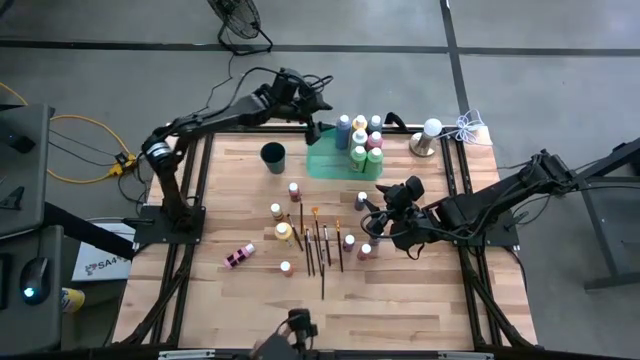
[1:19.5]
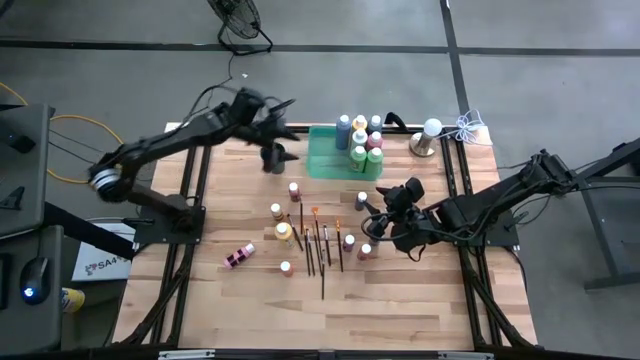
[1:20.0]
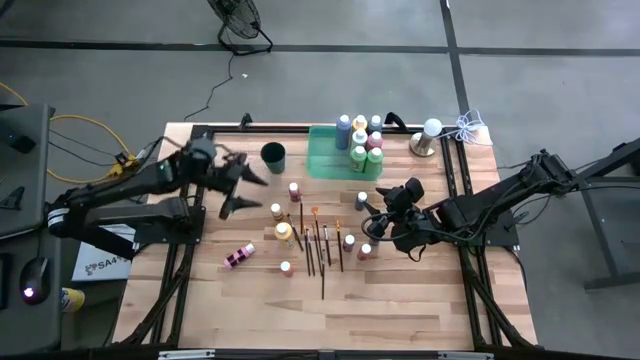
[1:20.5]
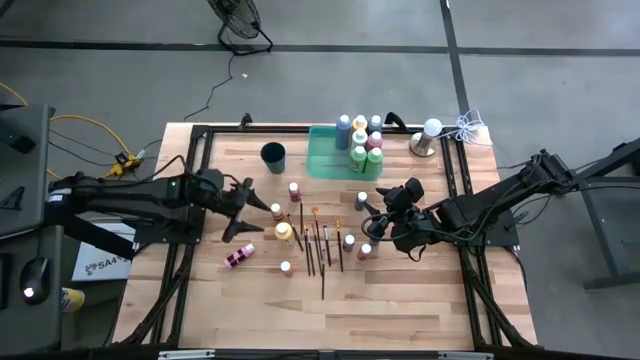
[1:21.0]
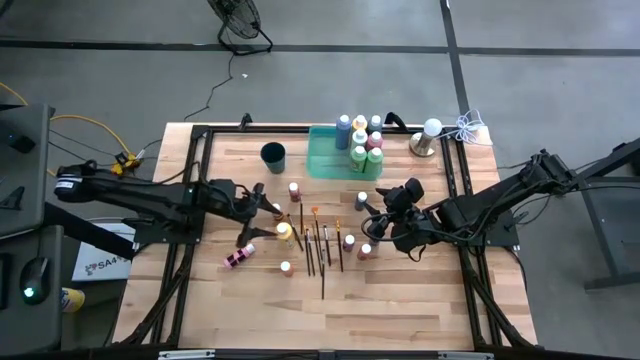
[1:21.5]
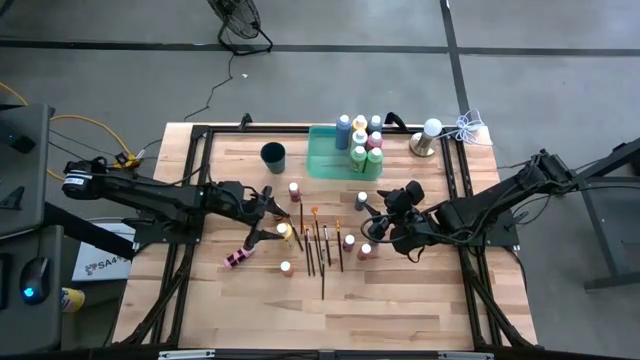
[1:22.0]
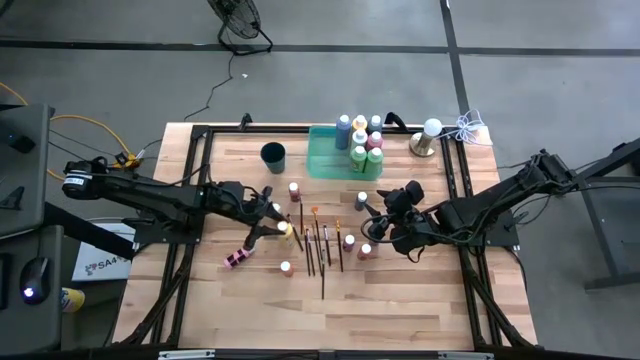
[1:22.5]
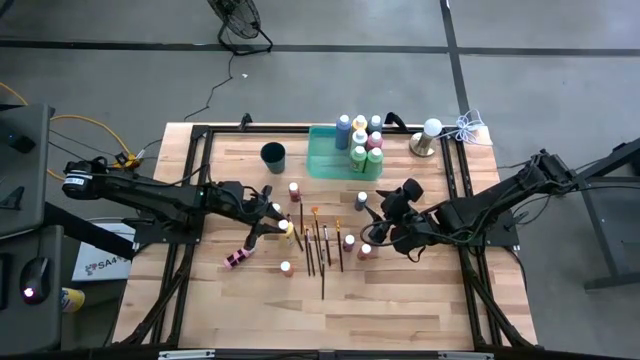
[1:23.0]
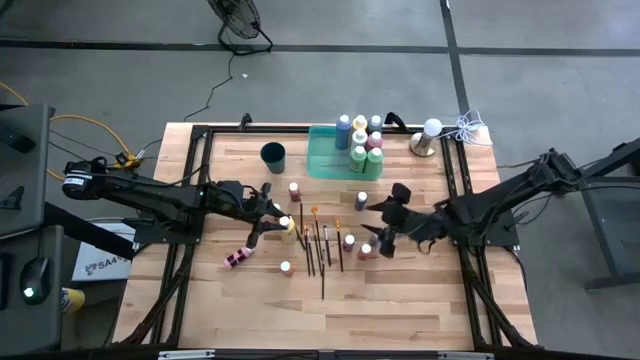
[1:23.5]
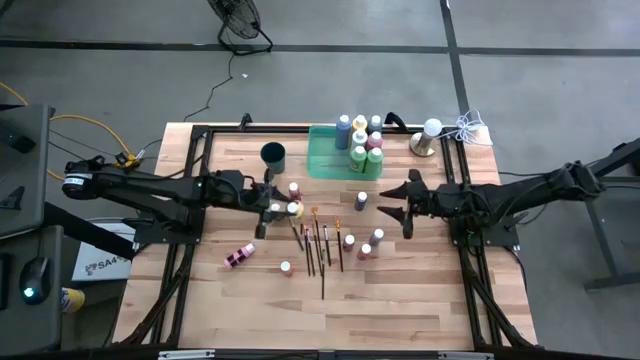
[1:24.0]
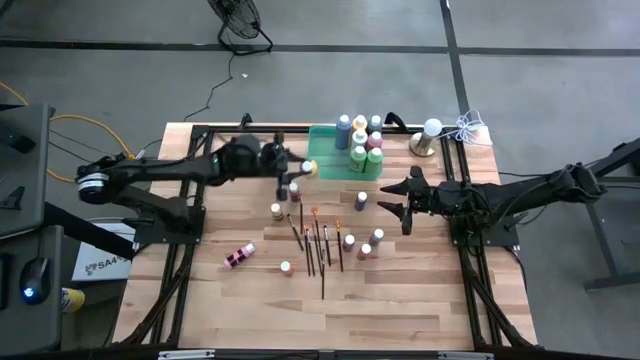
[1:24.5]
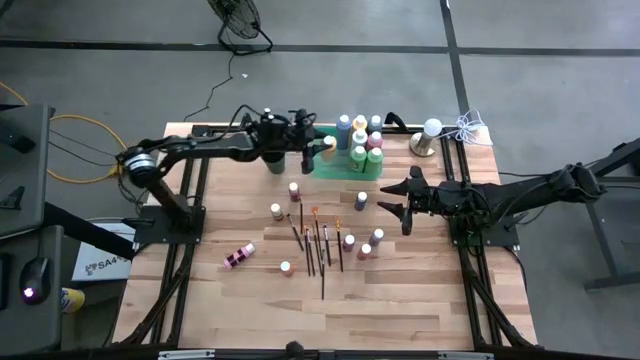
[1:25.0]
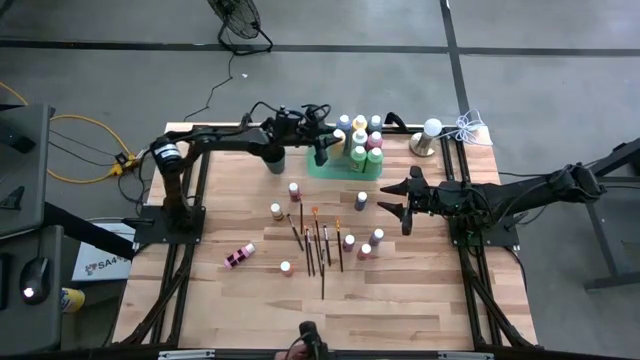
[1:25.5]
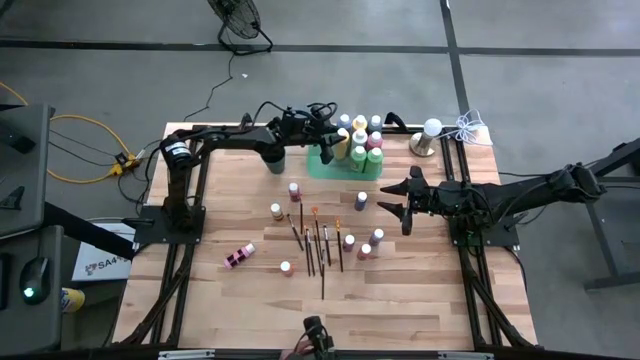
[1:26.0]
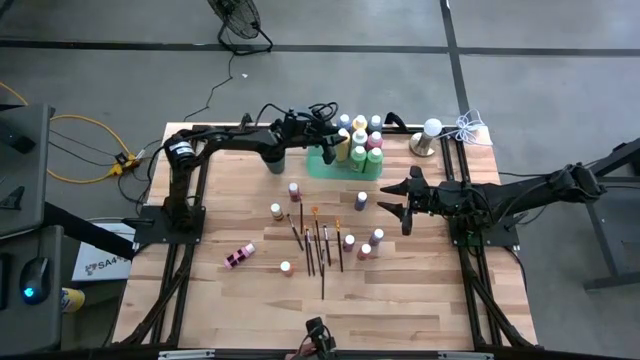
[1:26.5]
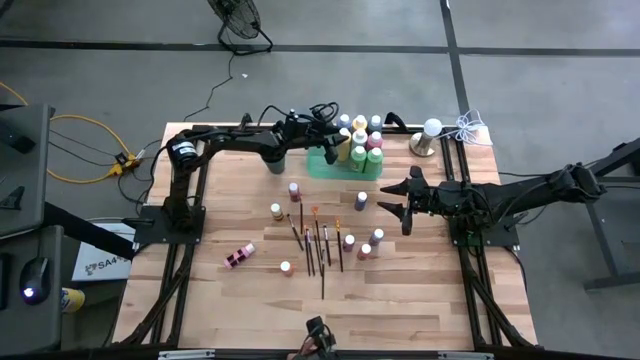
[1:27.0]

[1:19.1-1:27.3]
Task: Pick & Place Paint Supplies
Put the large yellow paint bottle into the green bin

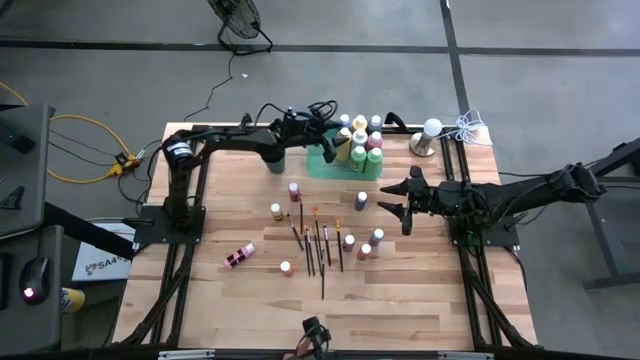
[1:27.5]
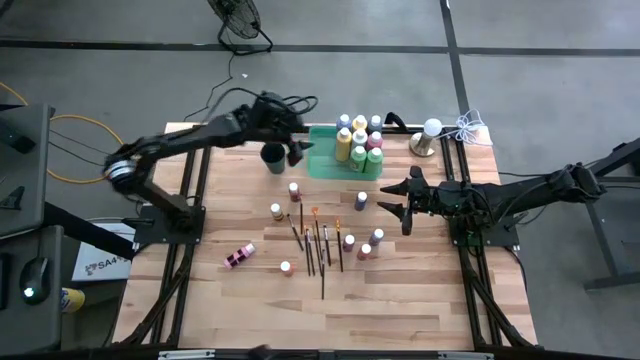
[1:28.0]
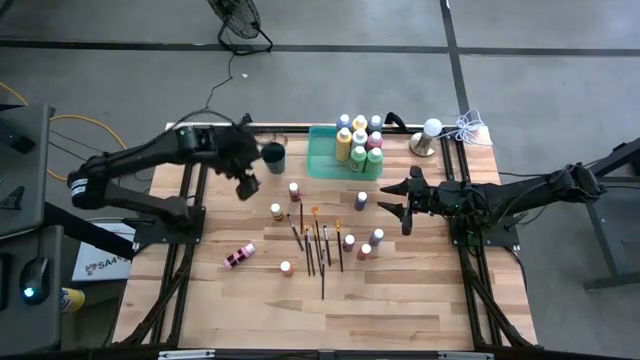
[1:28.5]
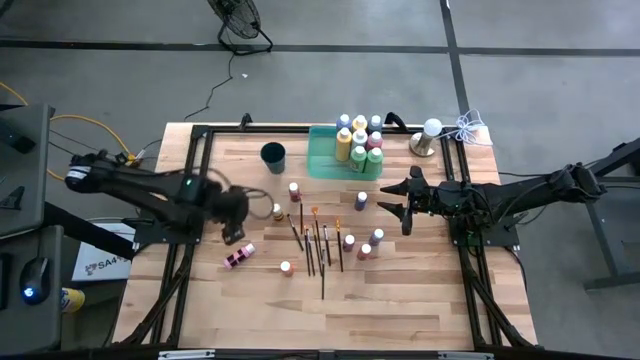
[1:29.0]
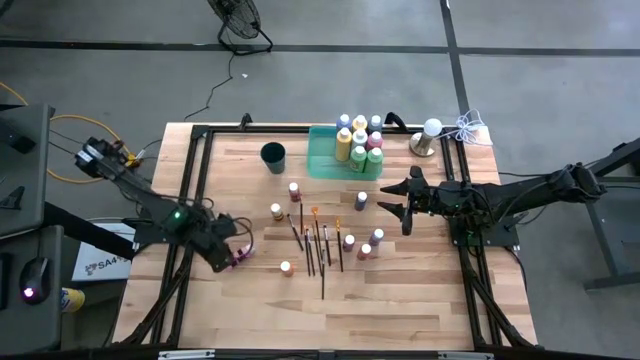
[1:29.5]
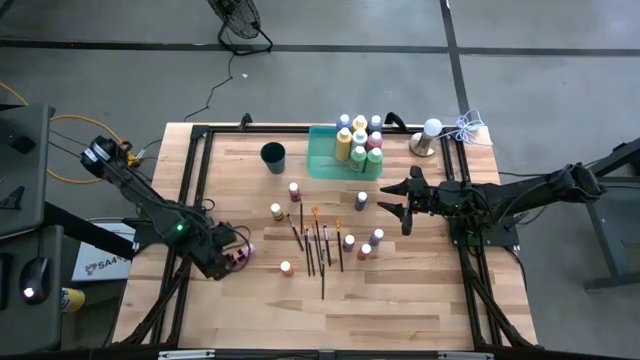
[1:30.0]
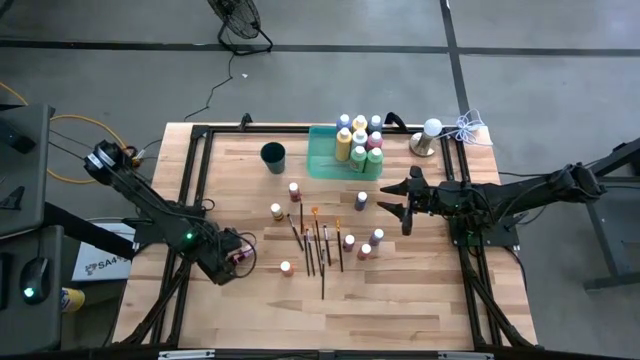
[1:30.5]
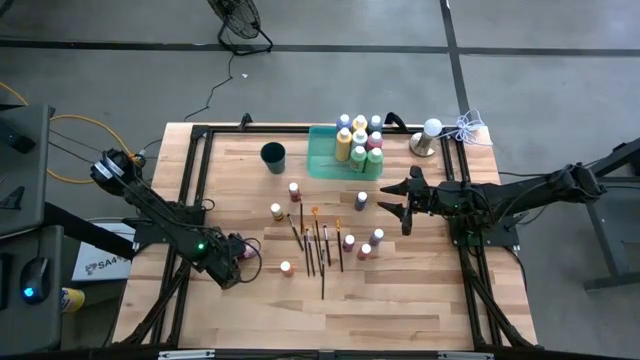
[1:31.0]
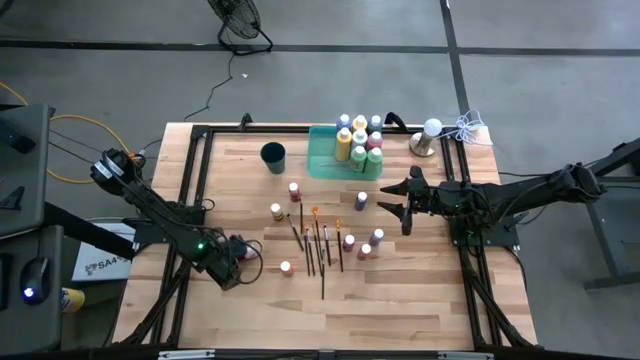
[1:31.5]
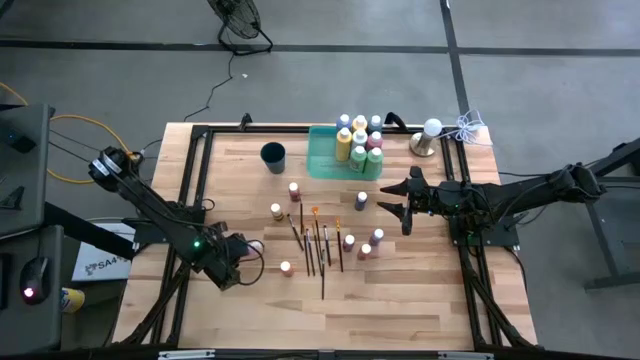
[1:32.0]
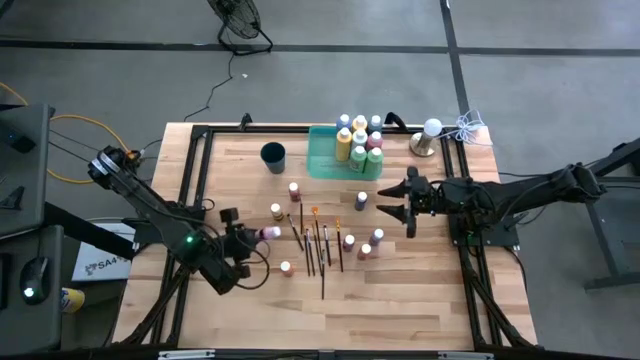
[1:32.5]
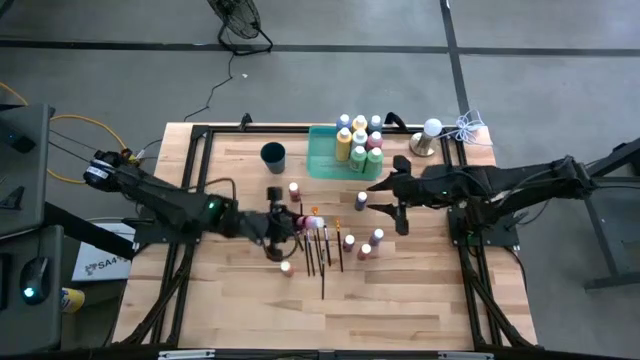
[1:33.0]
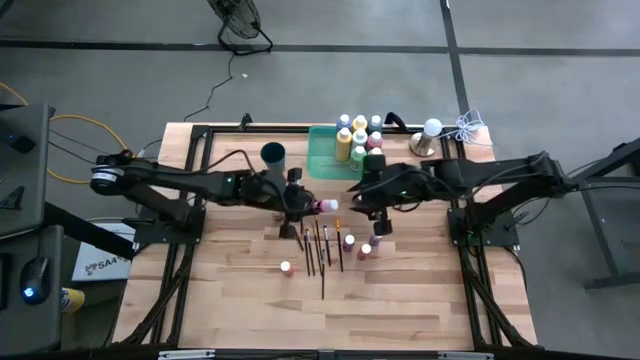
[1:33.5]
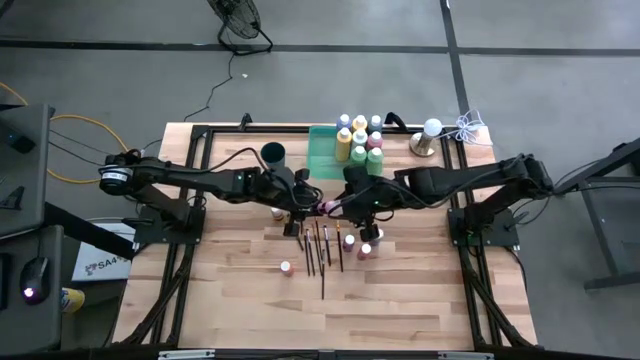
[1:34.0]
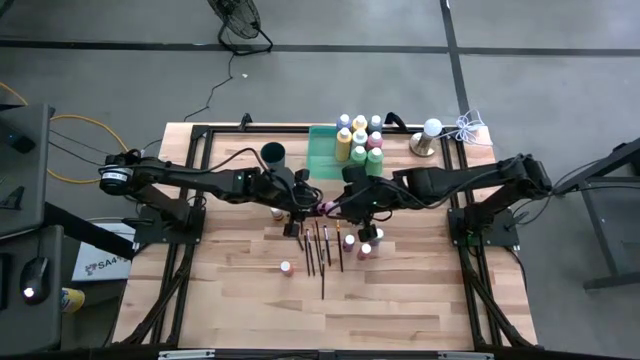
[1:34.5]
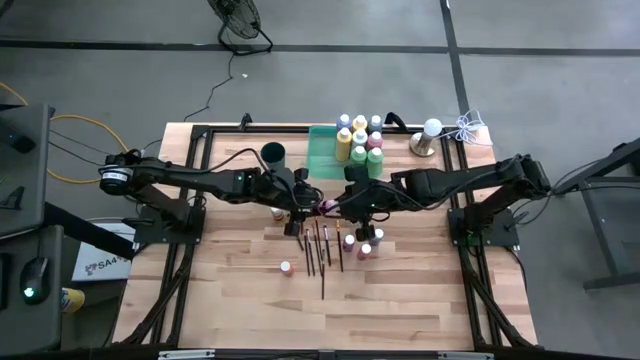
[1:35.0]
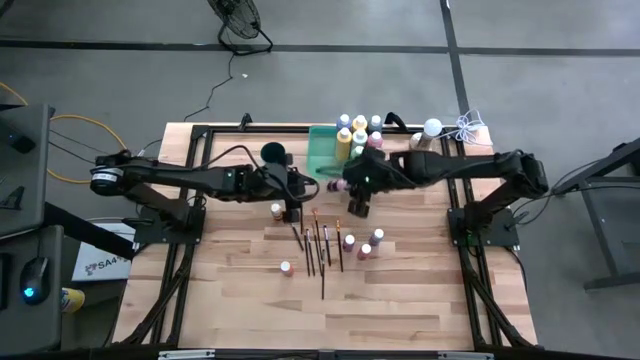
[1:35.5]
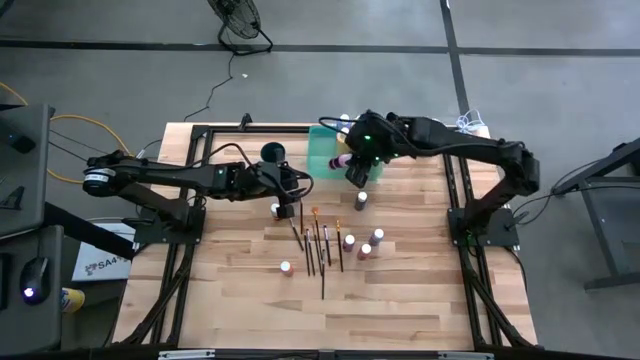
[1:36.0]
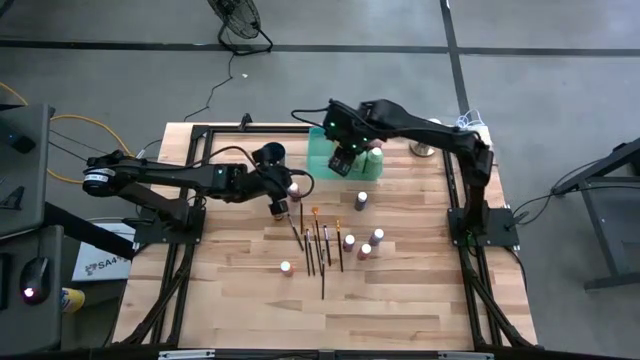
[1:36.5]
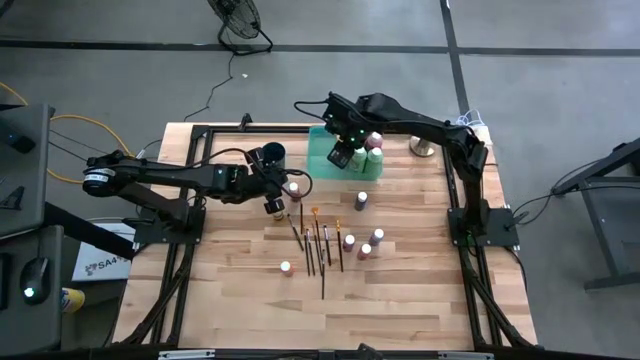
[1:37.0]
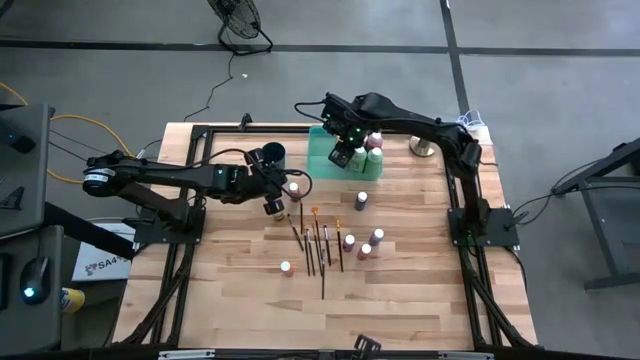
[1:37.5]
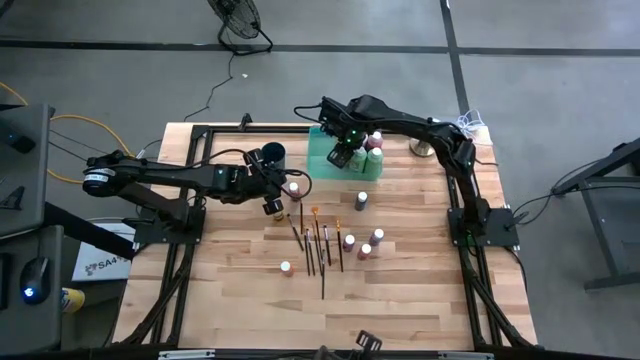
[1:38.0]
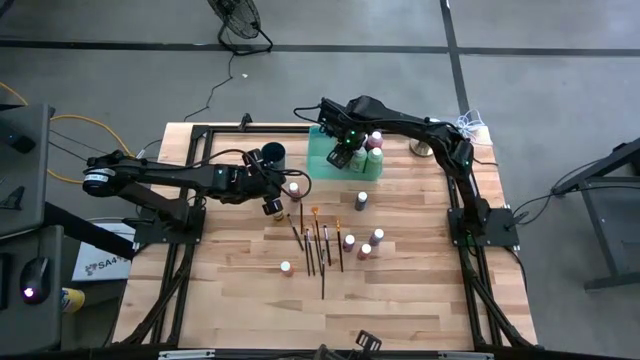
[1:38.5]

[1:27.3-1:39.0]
Put the small light pink paint bottle into the green bin

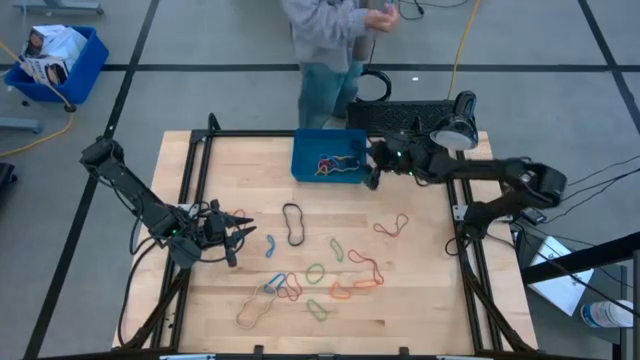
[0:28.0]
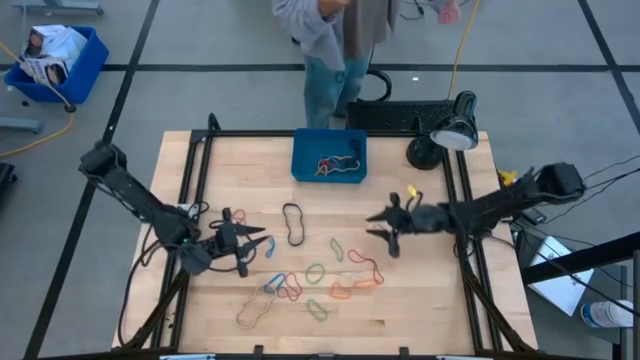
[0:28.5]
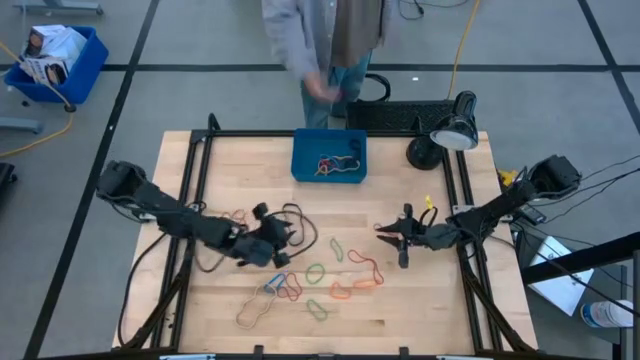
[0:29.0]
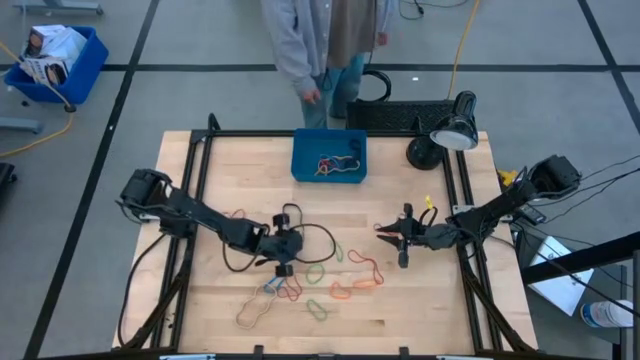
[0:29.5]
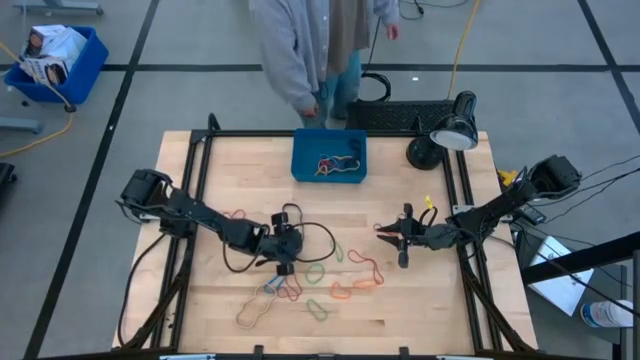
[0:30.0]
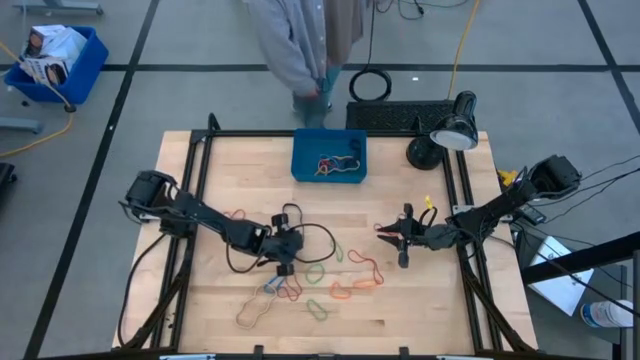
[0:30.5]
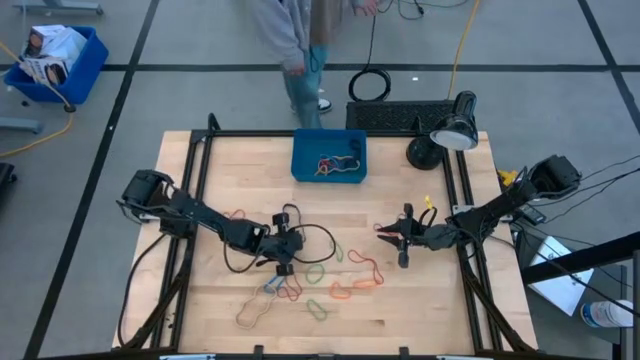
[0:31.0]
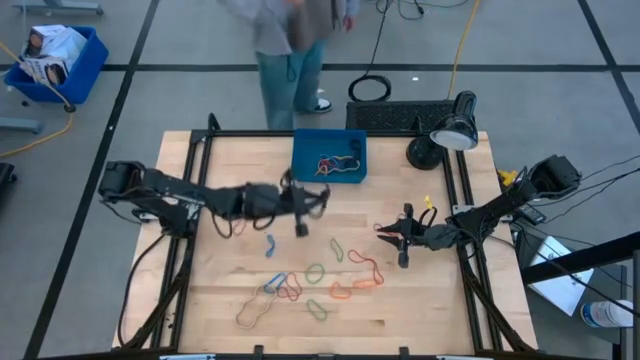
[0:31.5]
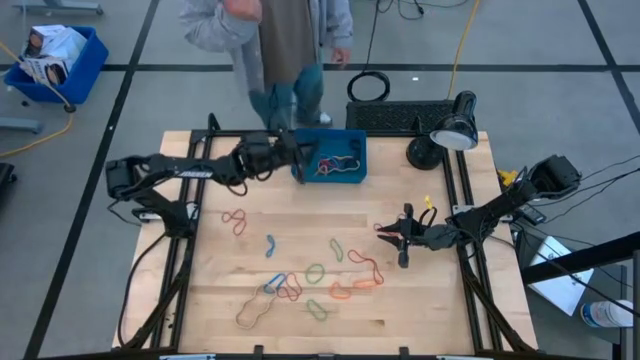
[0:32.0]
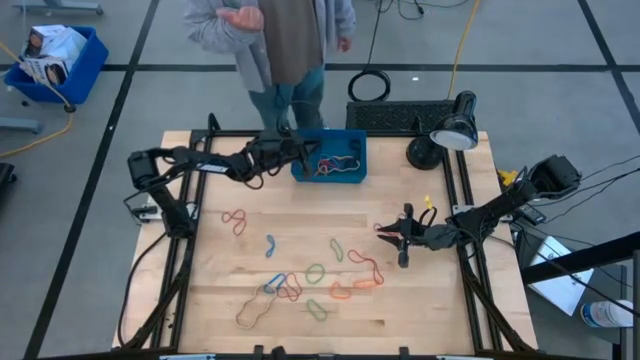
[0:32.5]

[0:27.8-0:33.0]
Task: Pick and place rubber bands into bin
Put the black rubber band into the blue bin
